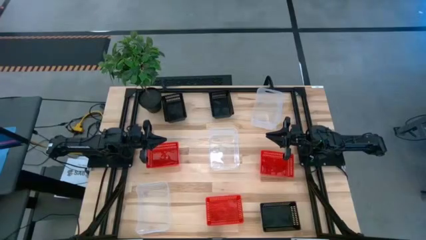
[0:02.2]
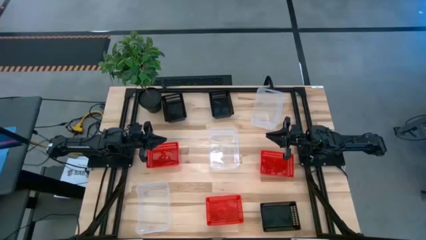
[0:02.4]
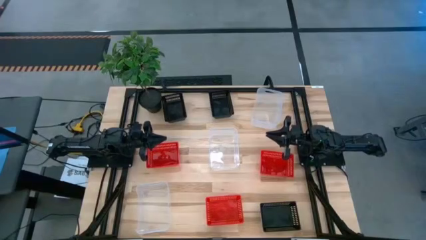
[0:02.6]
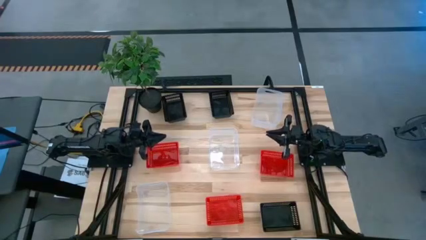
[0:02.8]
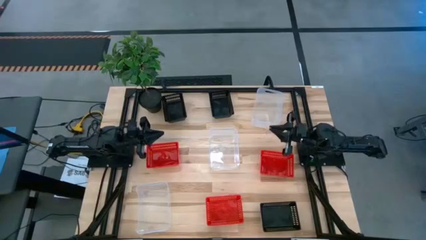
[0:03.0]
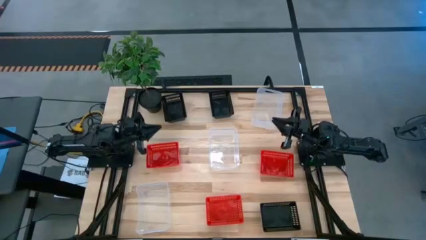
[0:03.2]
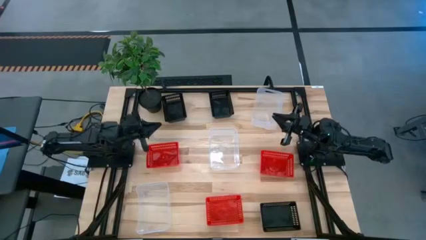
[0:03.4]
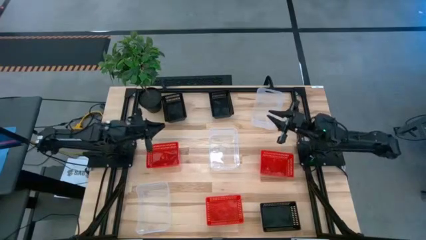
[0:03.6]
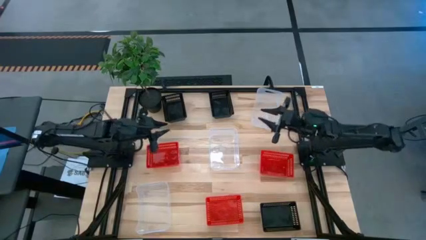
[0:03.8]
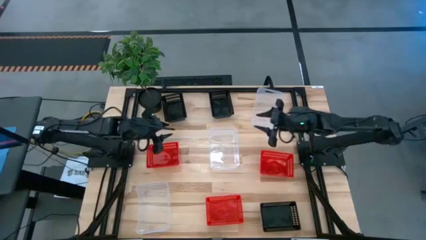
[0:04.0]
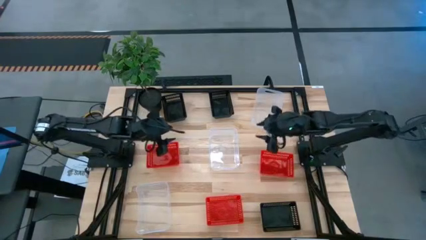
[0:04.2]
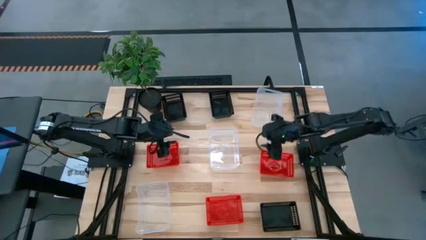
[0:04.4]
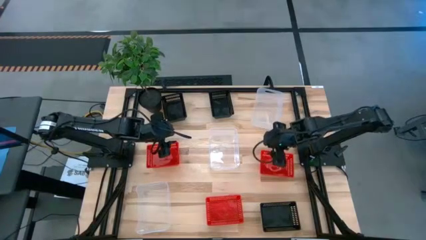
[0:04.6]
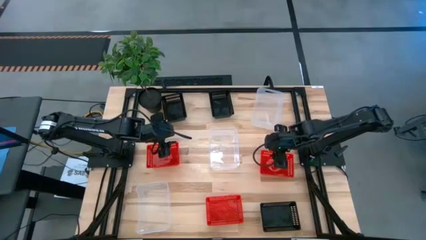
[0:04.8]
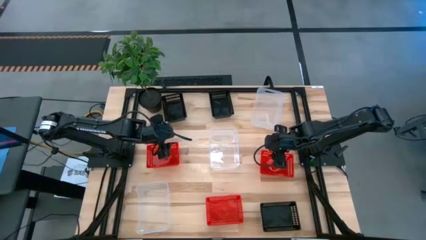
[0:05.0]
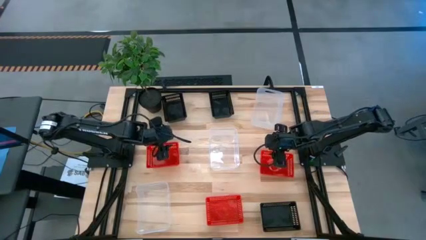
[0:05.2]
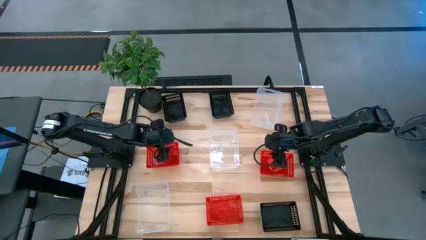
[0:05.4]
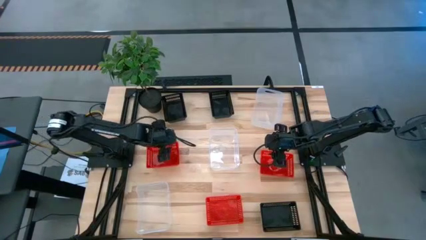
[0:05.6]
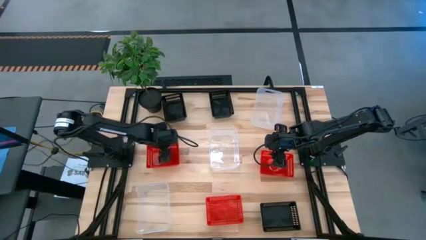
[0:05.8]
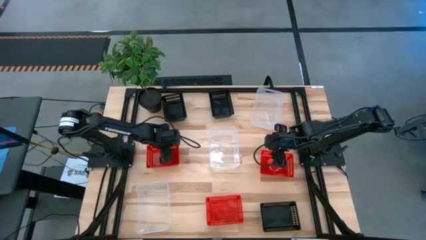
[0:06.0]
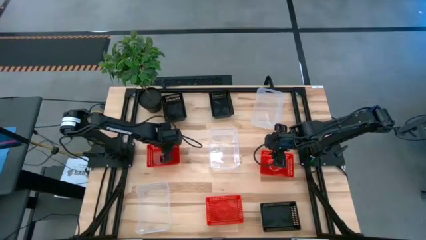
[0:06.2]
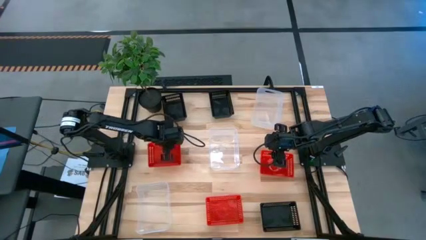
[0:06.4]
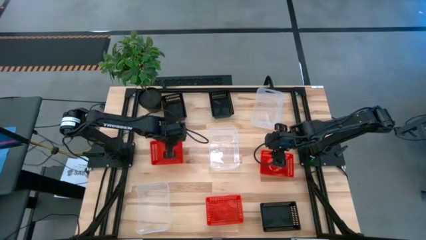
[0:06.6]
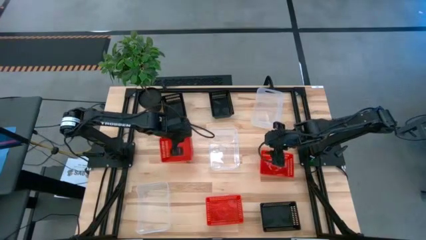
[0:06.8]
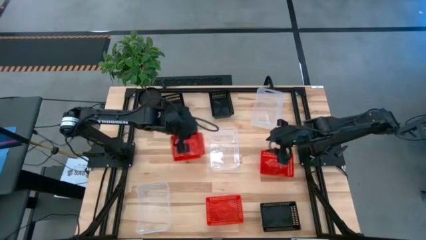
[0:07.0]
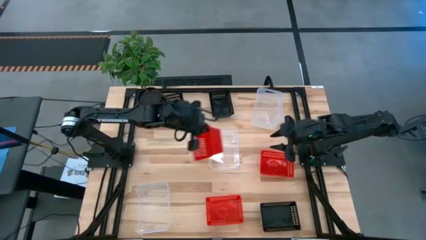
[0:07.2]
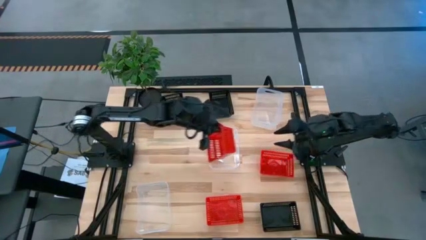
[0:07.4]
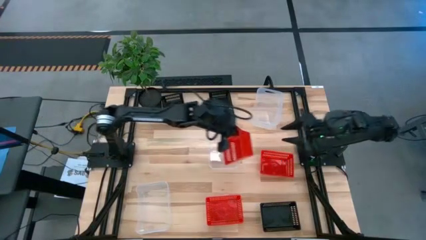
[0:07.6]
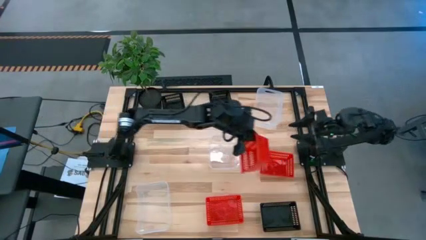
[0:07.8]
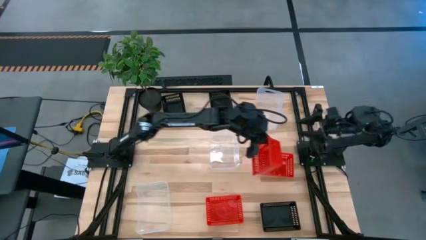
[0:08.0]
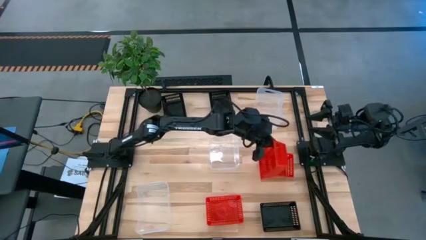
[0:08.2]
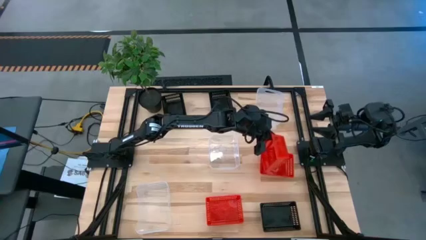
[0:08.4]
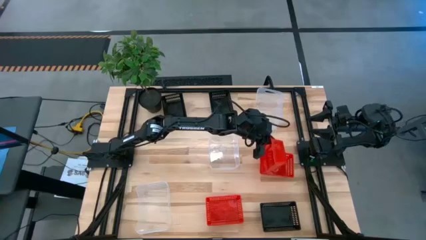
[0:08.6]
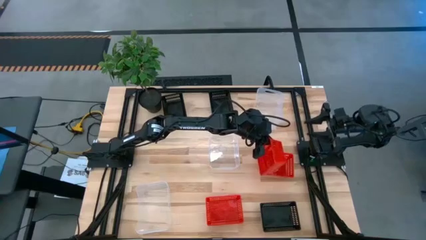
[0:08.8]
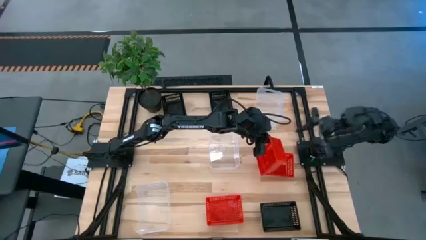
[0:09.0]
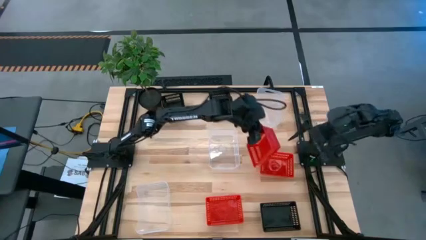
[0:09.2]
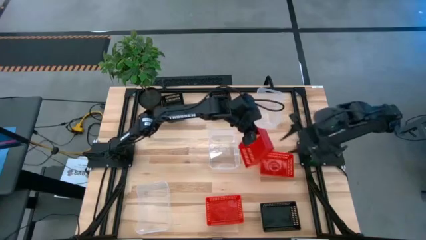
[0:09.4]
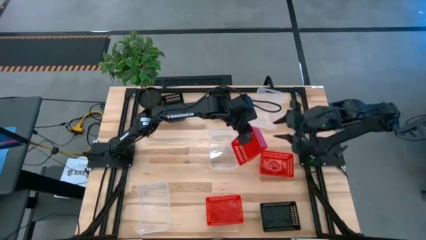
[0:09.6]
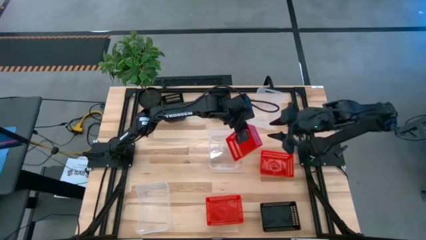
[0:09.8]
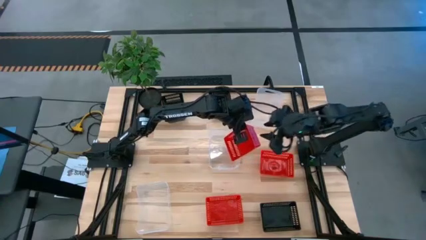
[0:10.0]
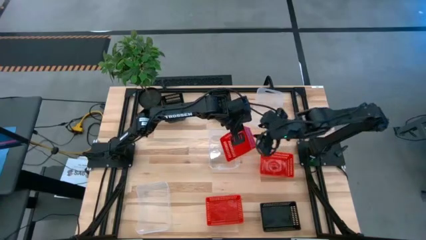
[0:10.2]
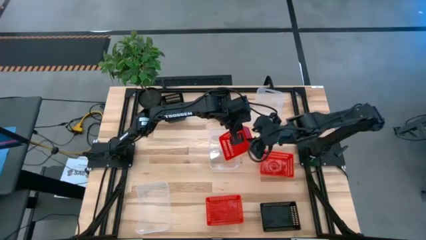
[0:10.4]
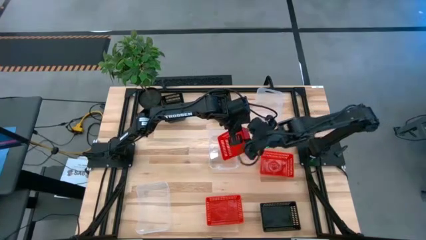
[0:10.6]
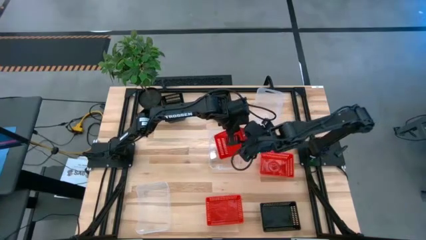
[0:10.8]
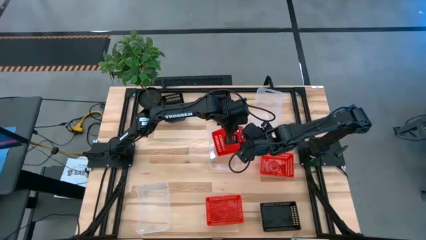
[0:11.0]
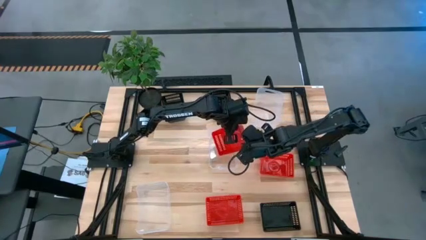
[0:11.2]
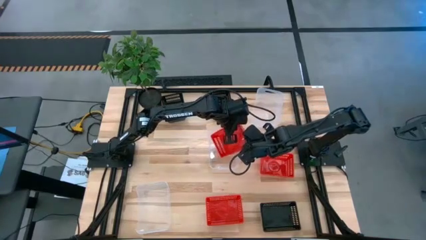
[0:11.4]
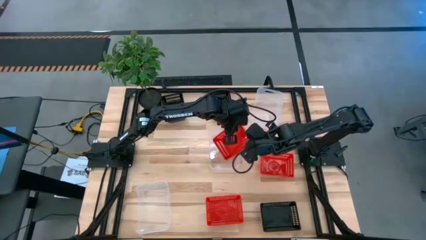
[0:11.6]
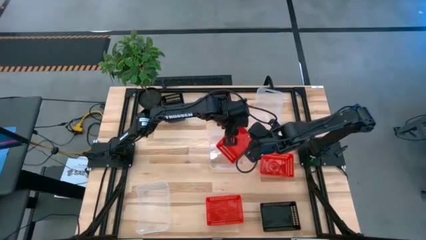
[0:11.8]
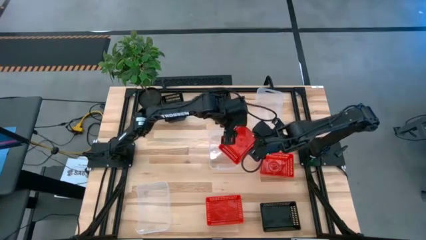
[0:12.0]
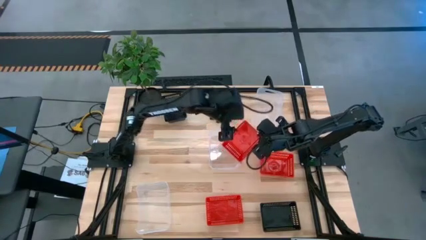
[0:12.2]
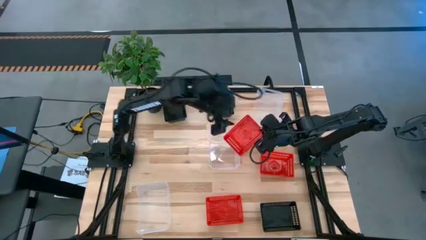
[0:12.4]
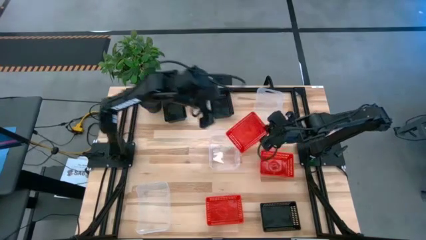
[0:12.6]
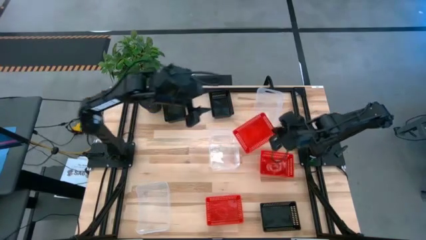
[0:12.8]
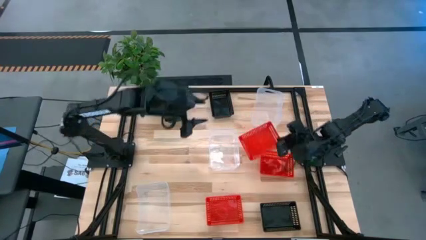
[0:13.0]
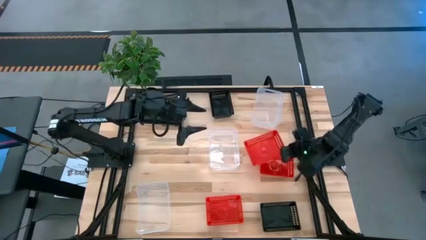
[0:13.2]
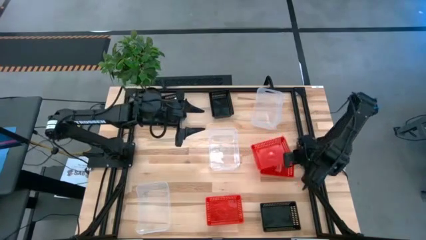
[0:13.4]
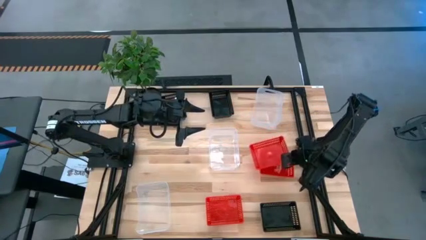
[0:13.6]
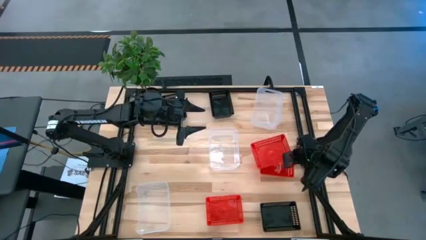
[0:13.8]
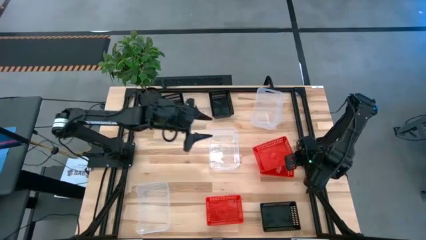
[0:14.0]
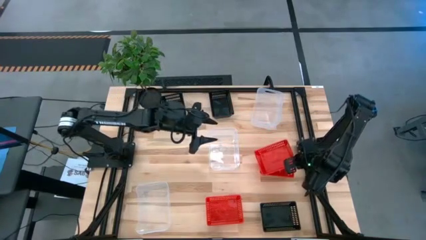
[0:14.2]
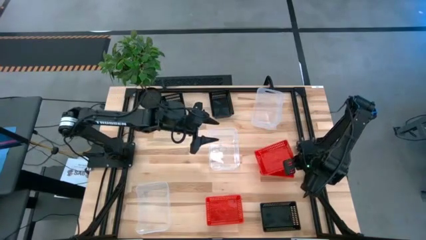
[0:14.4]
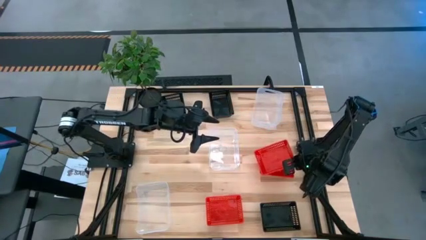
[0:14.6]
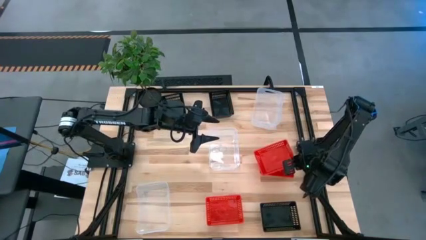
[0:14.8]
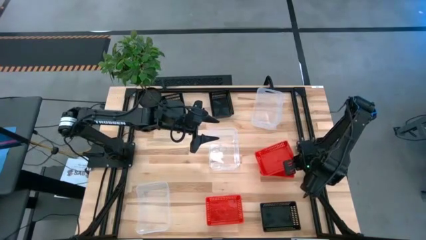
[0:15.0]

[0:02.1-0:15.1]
Stack the top left red bin on top of the top right red bin

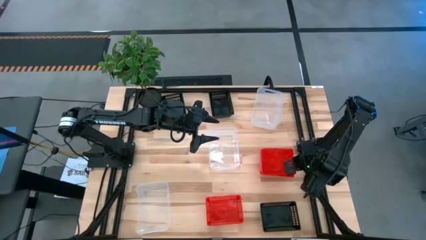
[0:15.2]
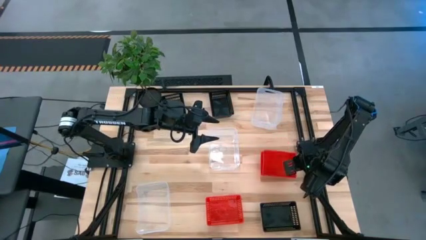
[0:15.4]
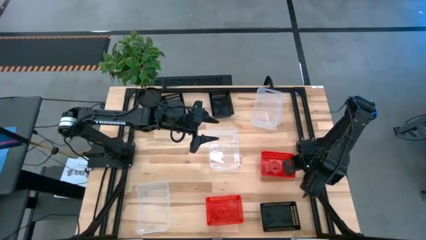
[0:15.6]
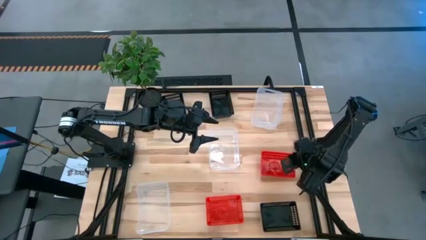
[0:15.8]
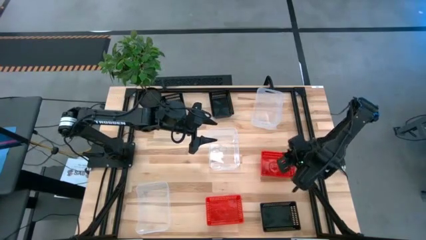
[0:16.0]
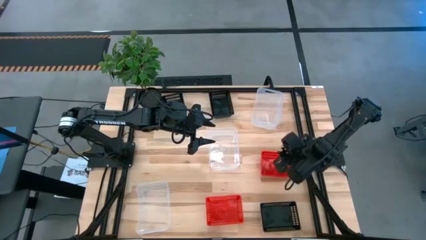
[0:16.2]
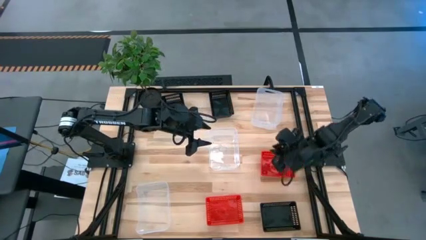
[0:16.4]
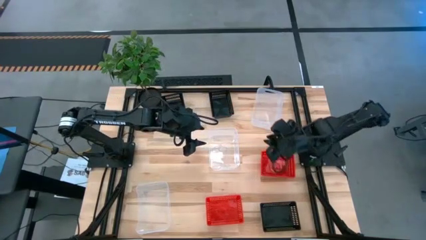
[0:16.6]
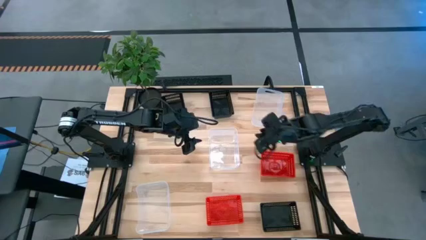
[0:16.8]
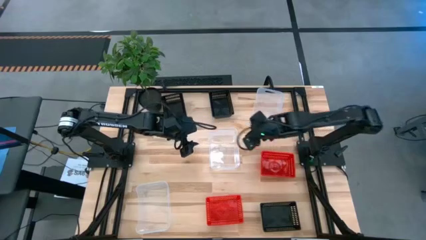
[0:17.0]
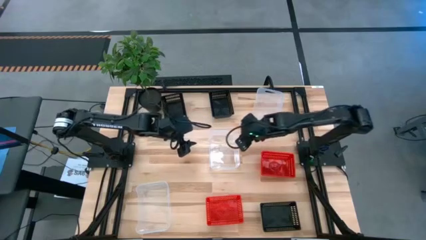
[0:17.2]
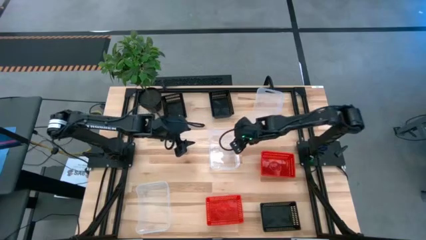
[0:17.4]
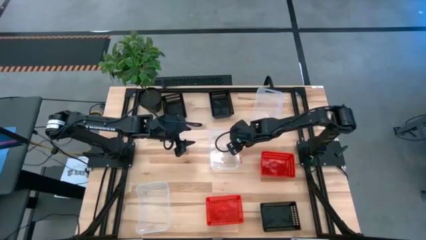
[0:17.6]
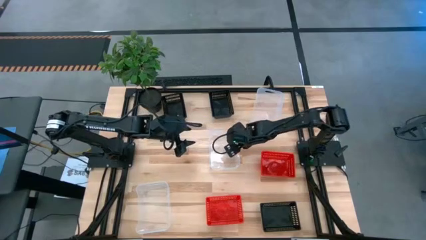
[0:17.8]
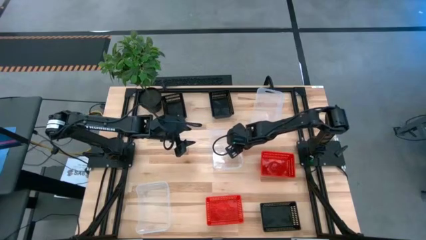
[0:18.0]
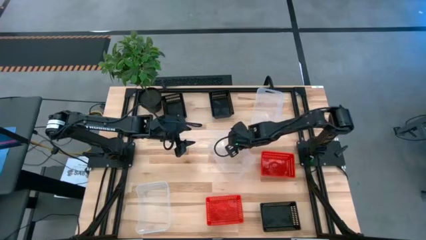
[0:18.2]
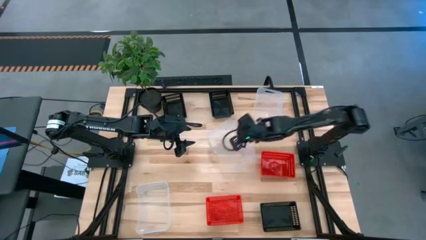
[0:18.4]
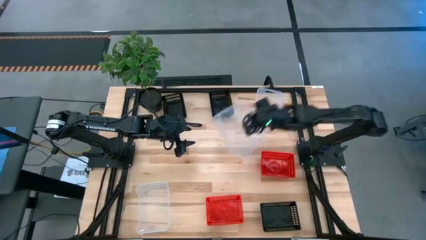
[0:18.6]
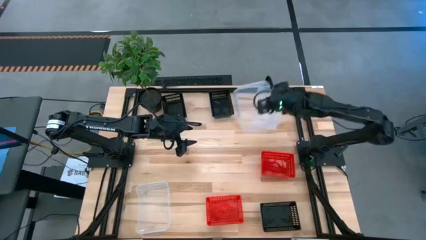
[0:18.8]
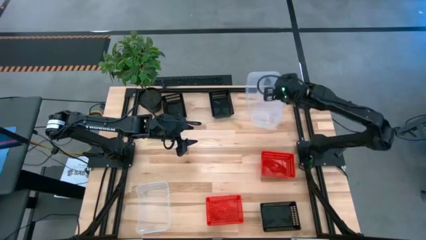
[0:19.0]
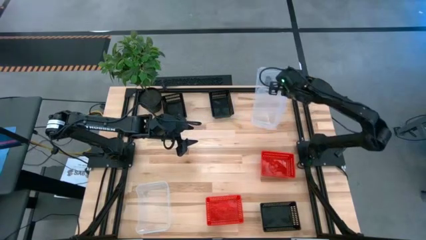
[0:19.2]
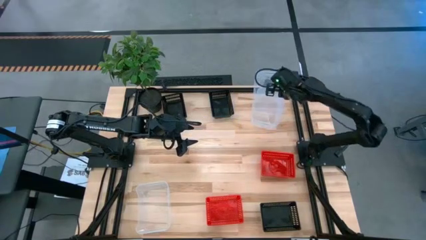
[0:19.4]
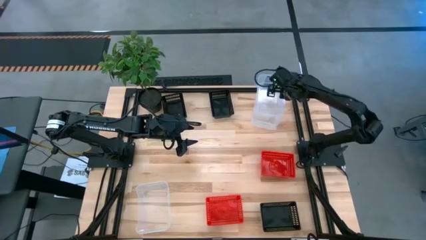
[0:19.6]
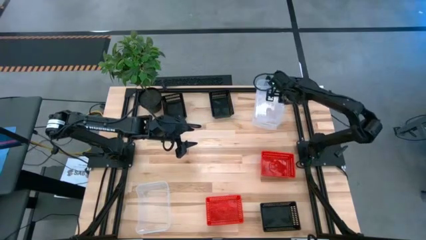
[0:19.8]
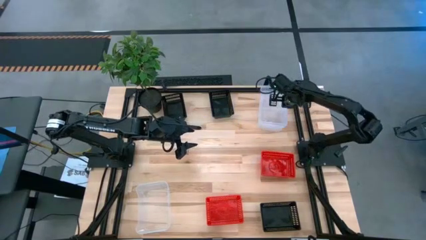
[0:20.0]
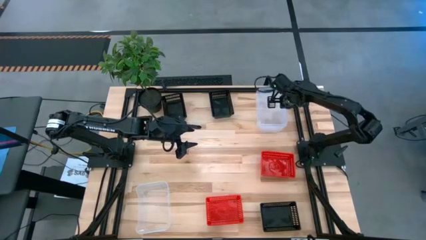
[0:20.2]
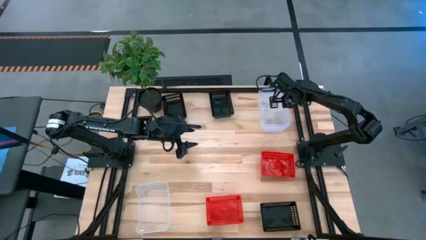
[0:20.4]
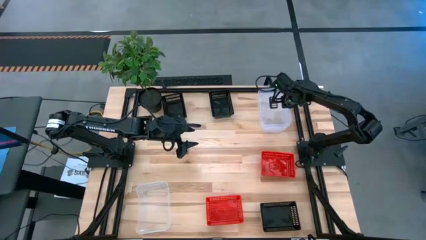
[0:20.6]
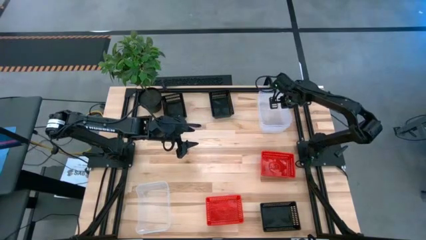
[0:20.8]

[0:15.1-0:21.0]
Stack the middle transparent bin on top of the top transparent bin
